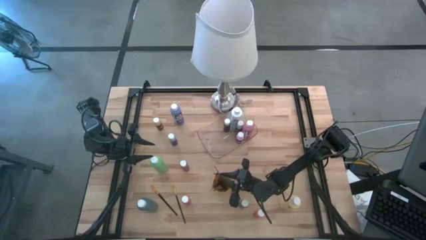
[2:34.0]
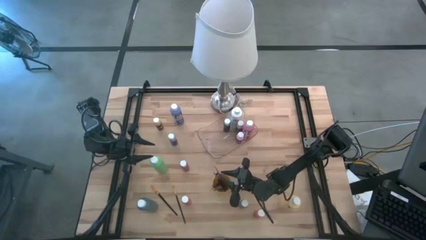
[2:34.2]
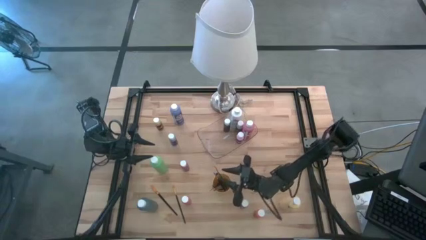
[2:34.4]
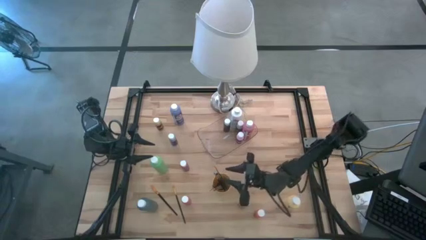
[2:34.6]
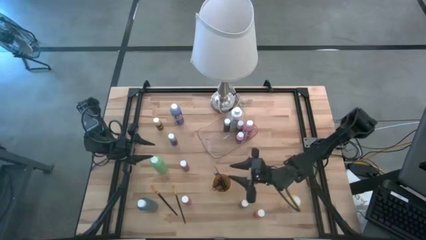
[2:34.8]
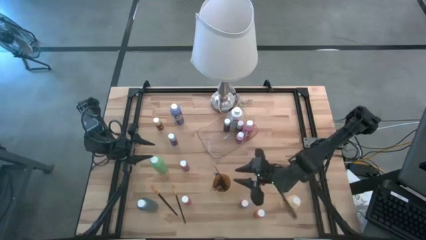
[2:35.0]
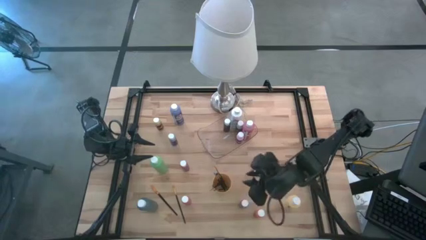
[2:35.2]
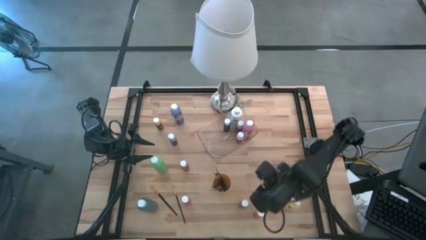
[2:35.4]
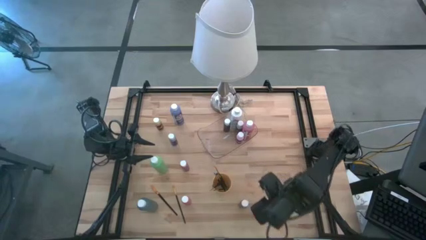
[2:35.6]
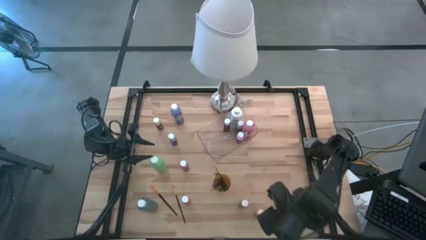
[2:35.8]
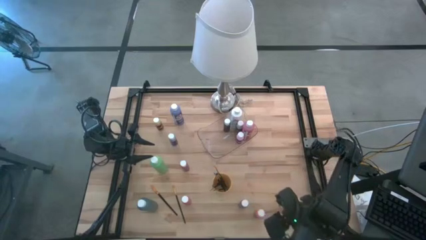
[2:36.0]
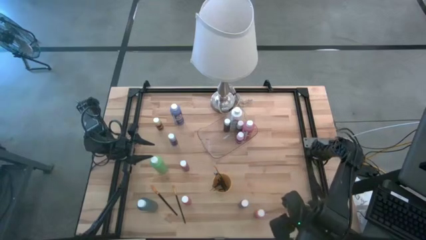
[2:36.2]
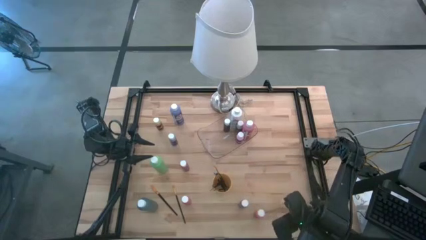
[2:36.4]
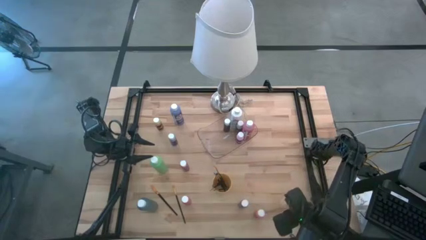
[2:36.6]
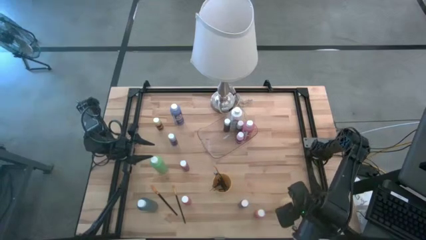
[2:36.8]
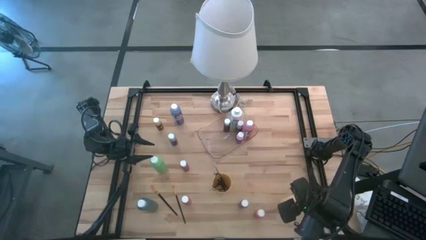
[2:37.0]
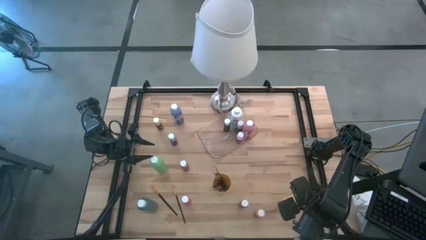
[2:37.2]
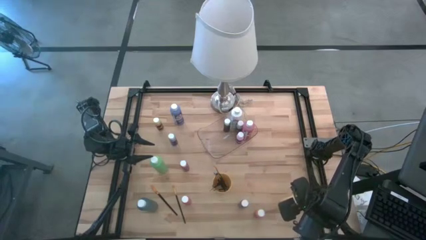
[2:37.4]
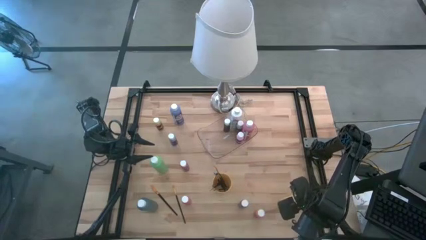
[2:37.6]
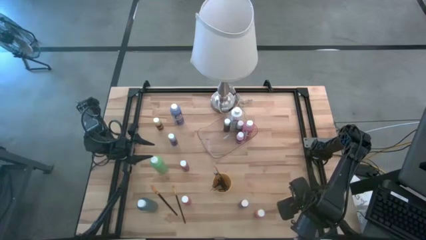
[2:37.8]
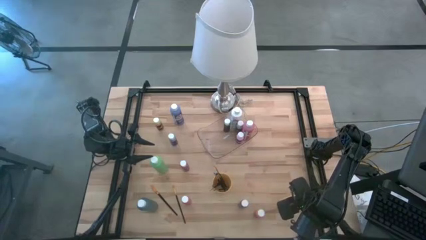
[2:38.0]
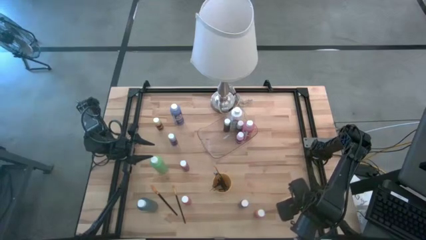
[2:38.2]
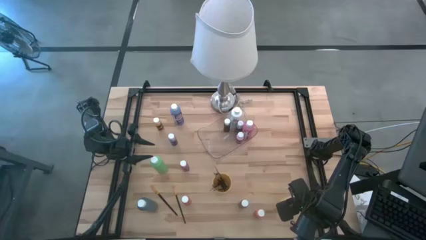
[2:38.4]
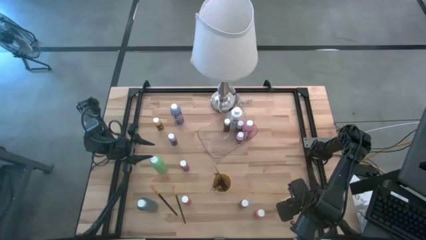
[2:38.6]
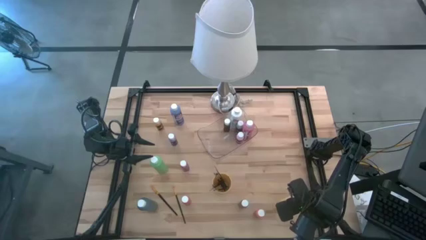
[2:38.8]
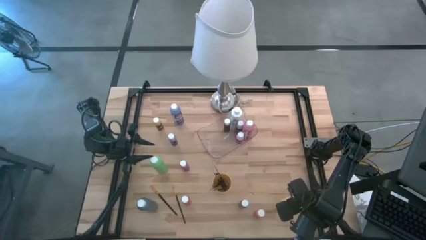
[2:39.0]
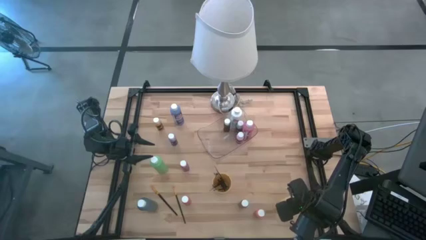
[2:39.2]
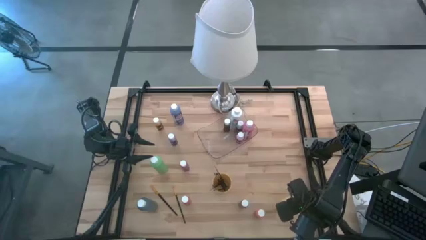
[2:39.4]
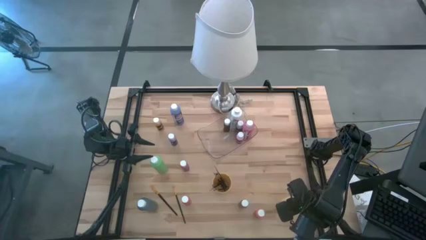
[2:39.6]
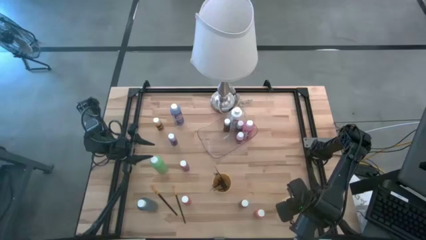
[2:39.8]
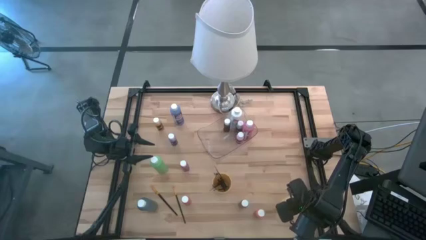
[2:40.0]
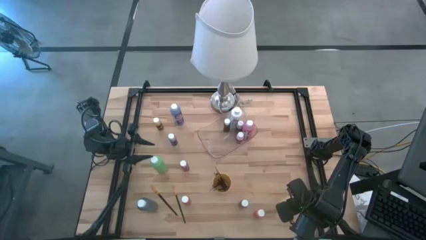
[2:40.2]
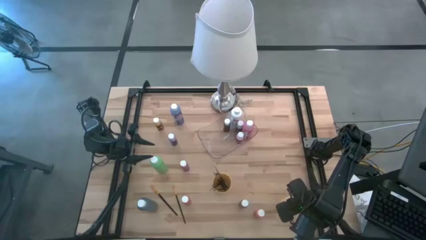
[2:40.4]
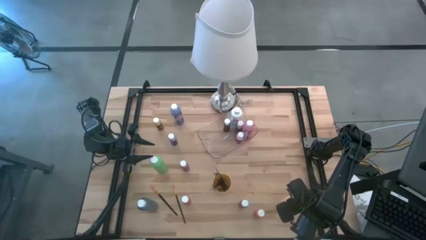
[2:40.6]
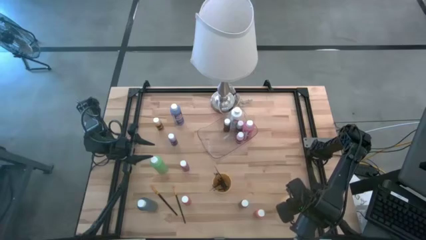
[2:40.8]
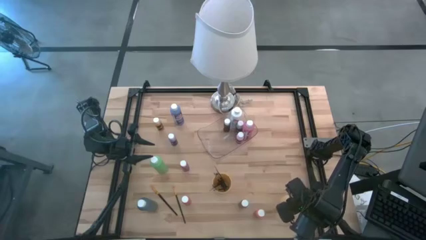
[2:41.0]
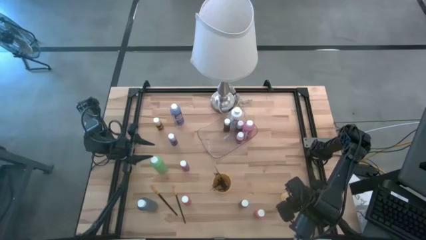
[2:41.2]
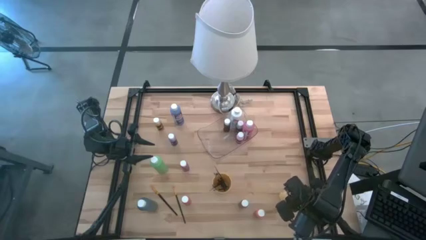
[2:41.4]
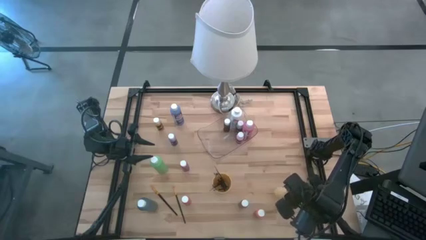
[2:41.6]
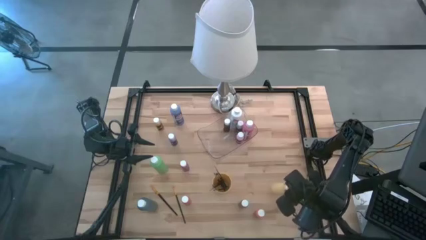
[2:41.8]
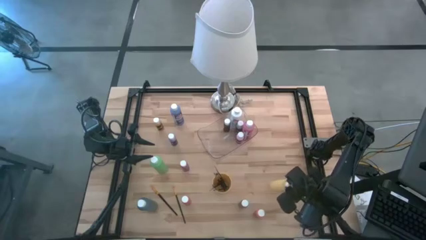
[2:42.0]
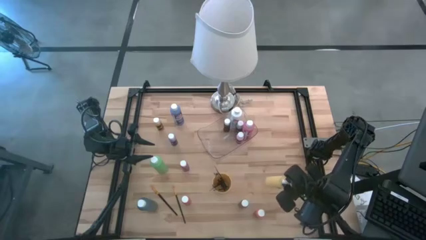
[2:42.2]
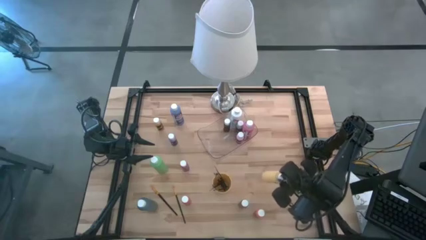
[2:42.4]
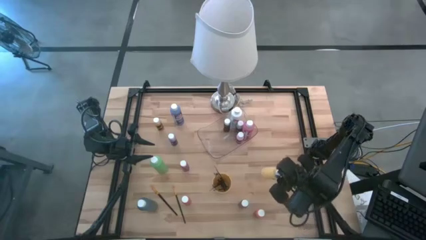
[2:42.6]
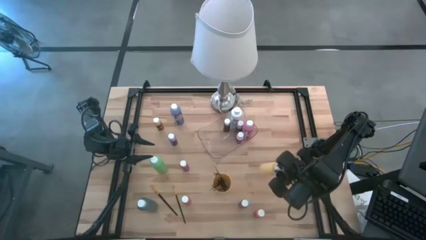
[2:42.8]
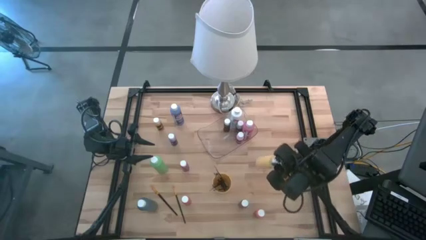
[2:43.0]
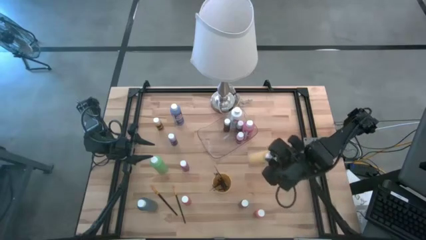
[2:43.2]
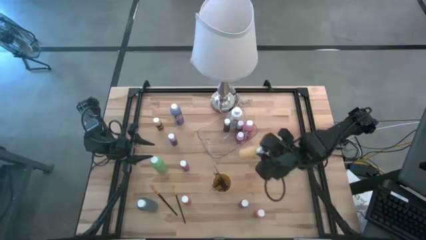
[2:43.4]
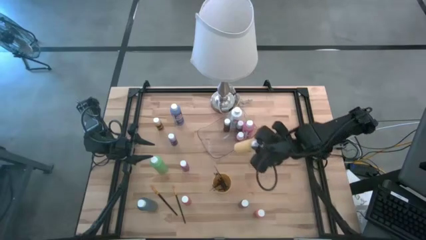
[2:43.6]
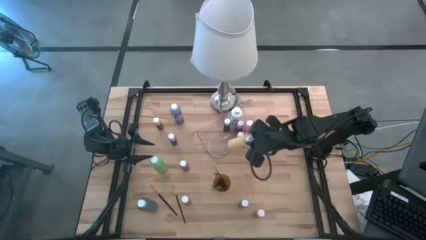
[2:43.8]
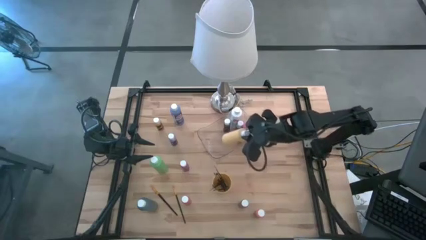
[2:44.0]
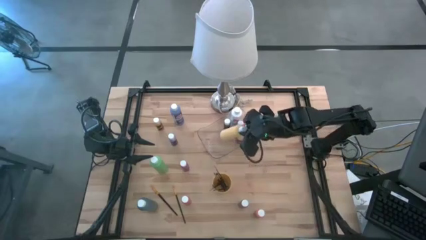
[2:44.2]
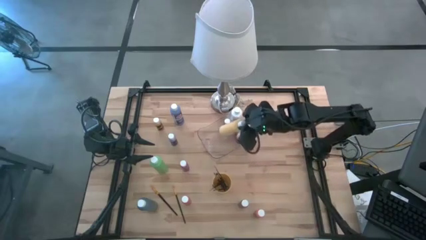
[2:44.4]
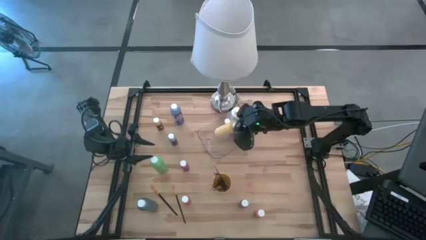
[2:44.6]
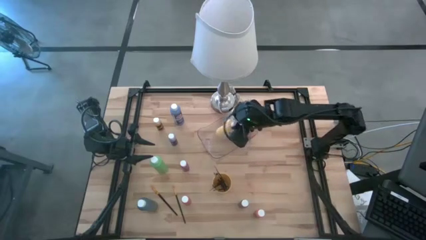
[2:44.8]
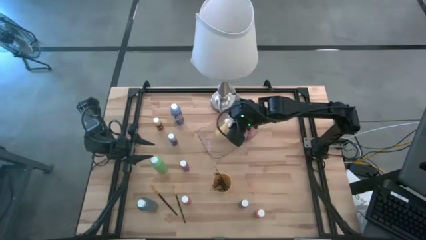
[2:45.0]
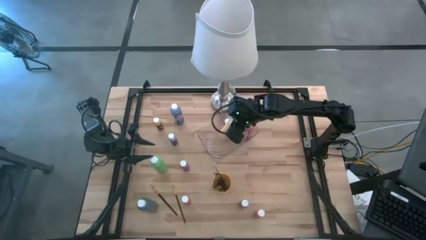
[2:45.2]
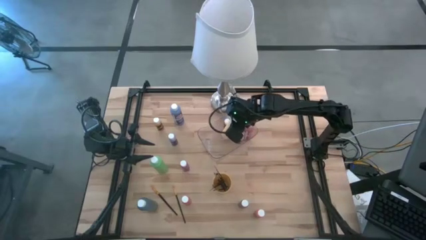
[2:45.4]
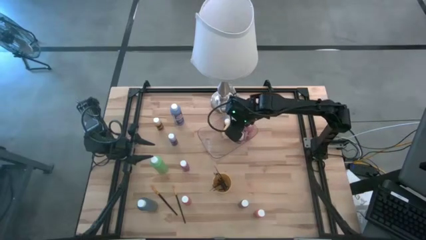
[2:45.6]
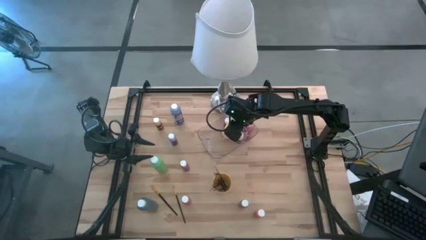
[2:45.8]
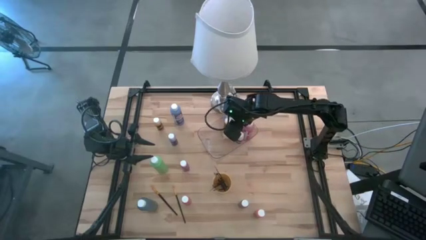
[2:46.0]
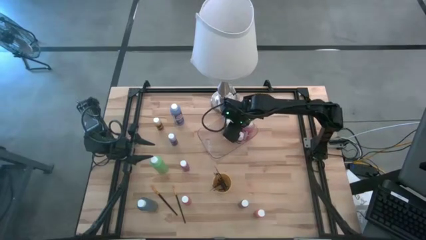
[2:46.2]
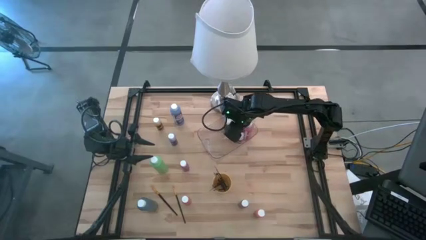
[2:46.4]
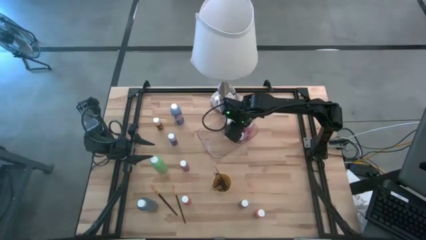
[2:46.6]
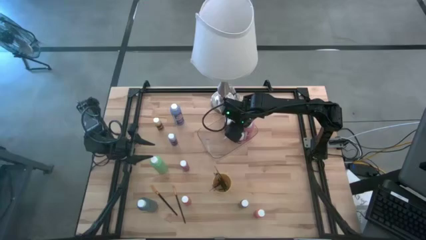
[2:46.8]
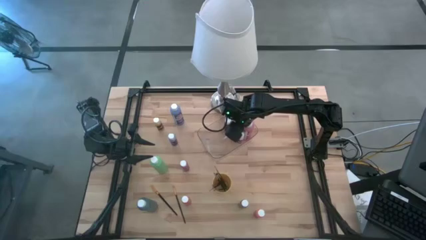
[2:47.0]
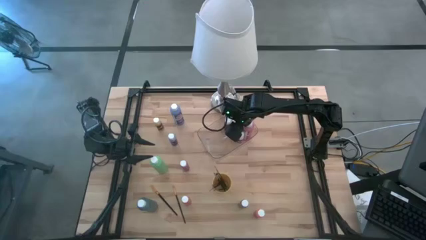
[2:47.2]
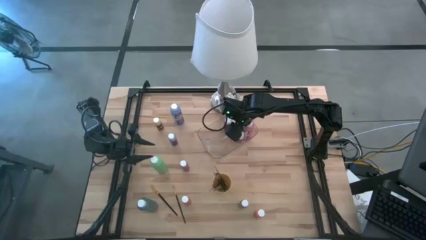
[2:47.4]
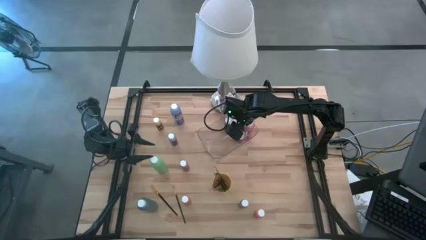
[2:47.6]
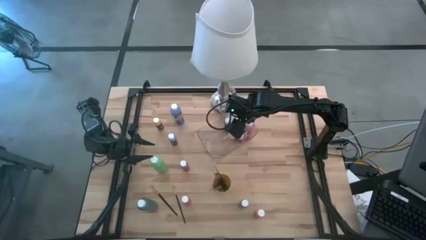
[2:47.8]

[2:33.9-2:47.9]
Task: Pick & Place Paint Supplies
Put the light yellow bottle into the transparent bin
